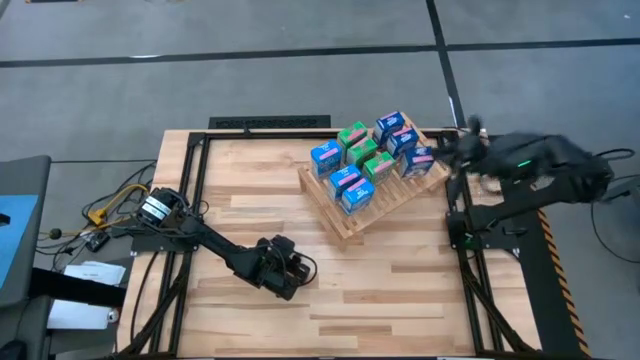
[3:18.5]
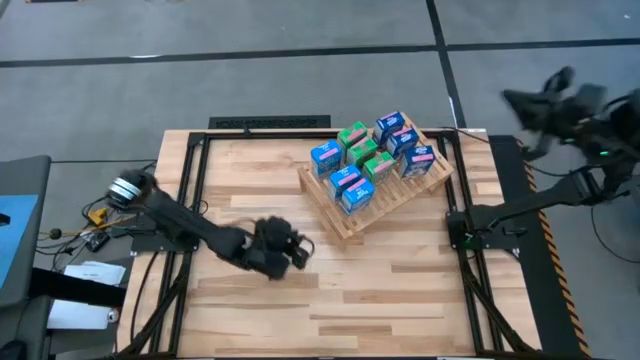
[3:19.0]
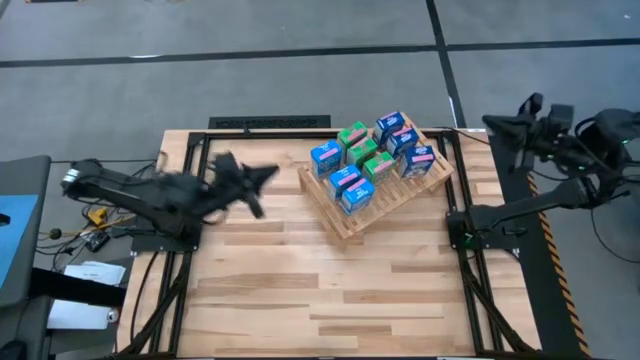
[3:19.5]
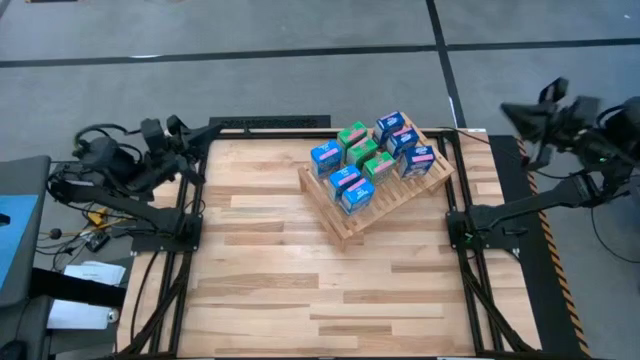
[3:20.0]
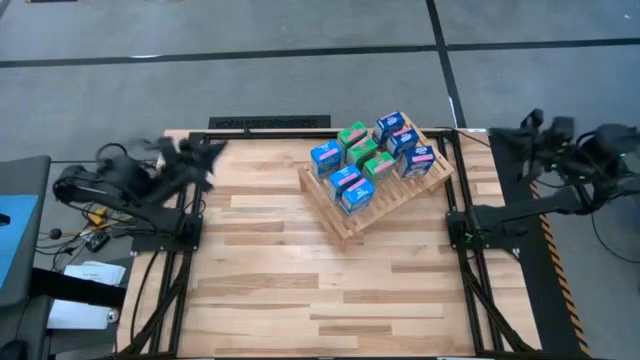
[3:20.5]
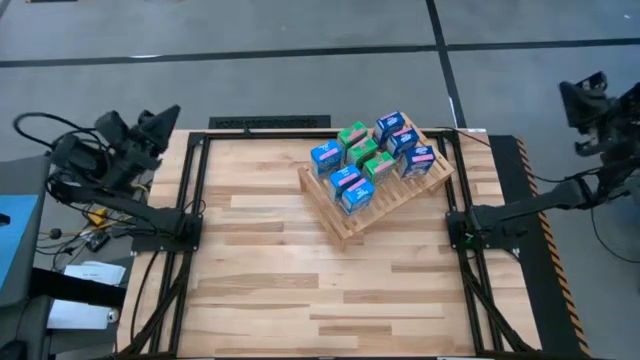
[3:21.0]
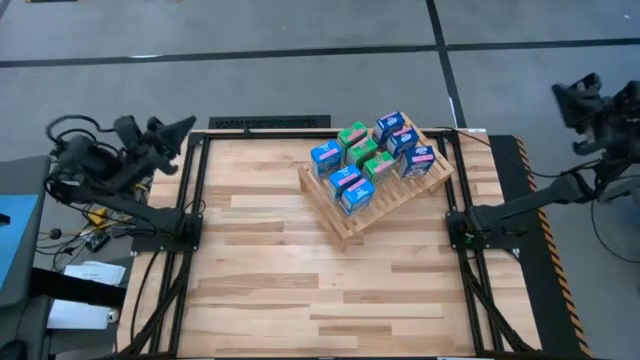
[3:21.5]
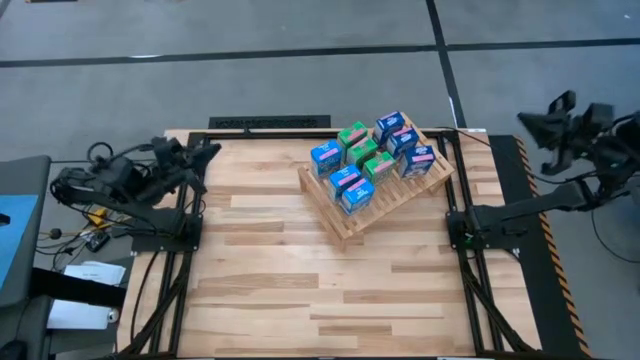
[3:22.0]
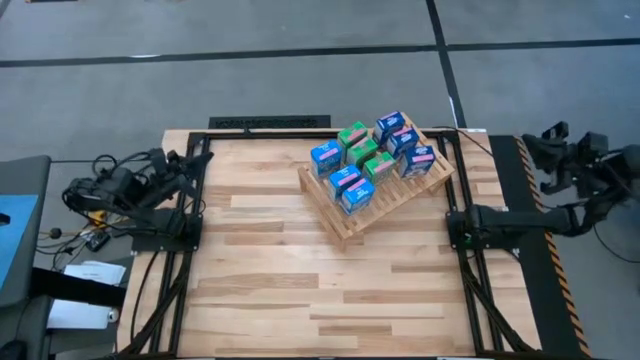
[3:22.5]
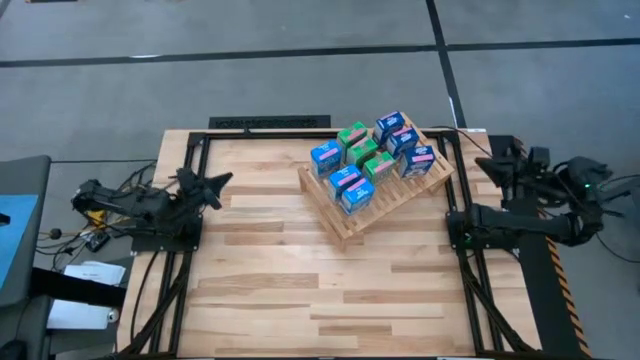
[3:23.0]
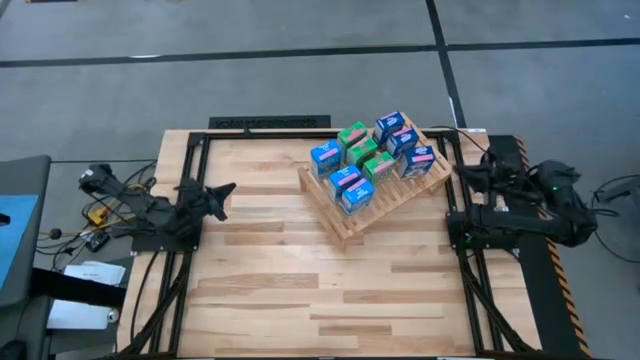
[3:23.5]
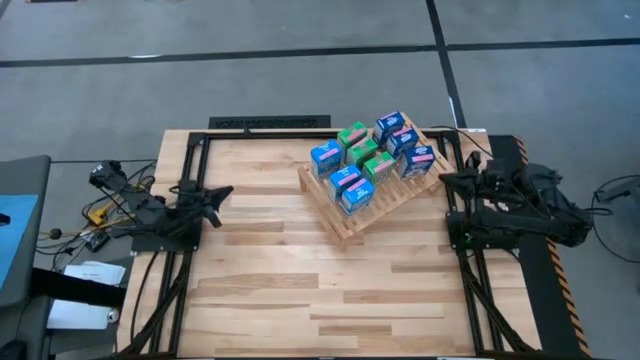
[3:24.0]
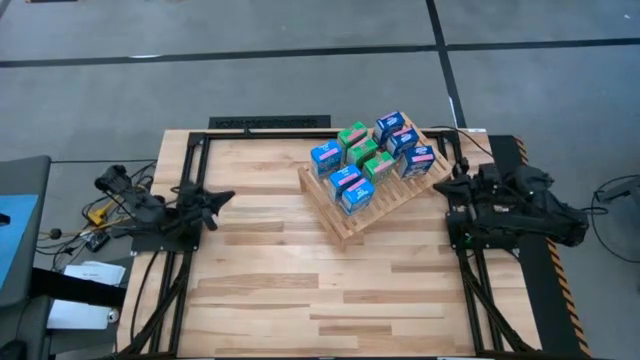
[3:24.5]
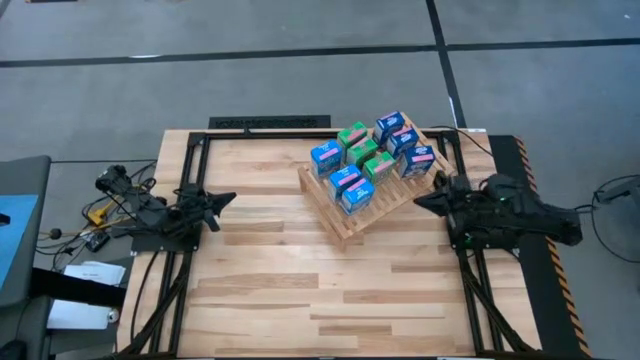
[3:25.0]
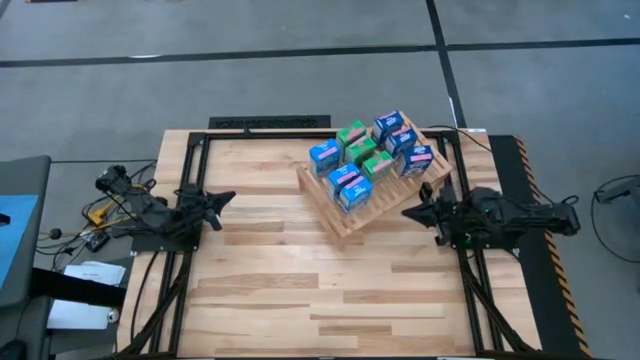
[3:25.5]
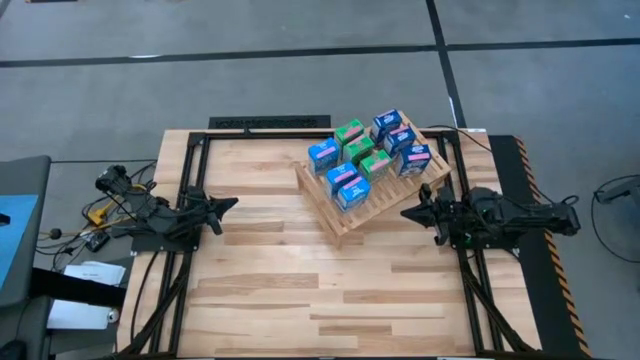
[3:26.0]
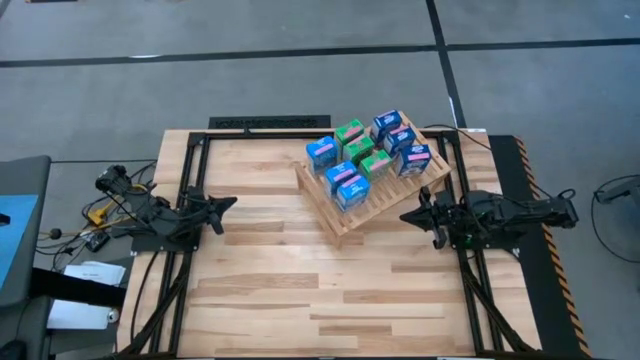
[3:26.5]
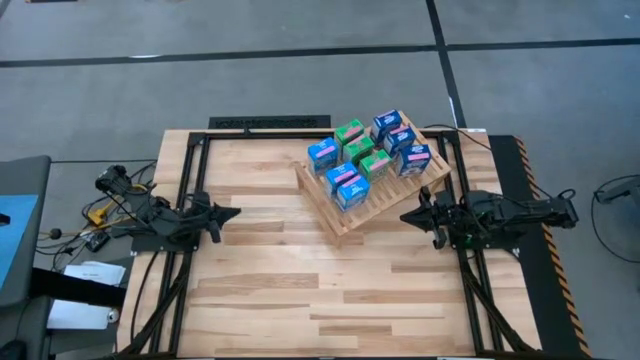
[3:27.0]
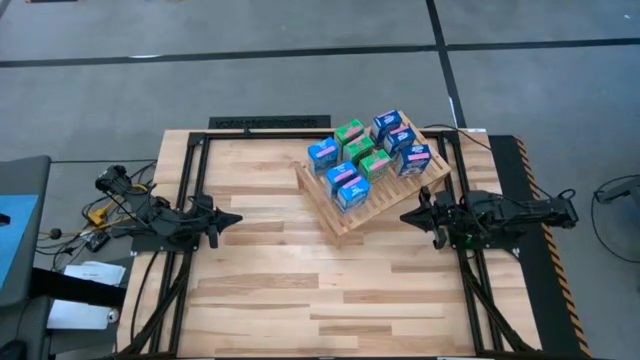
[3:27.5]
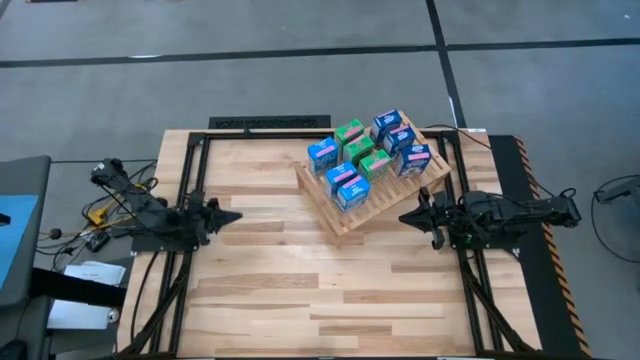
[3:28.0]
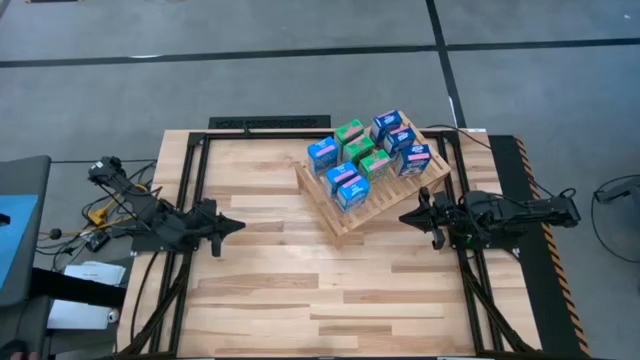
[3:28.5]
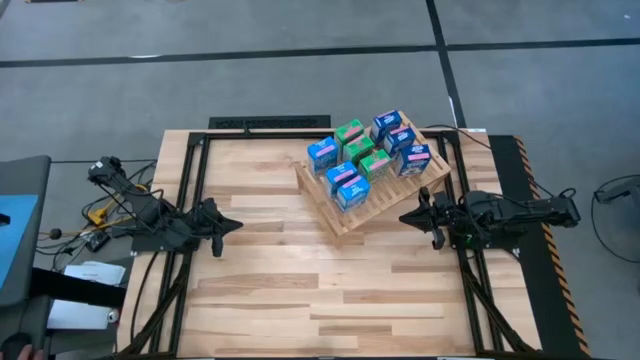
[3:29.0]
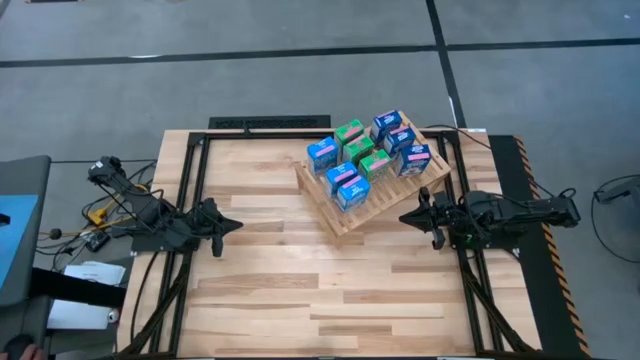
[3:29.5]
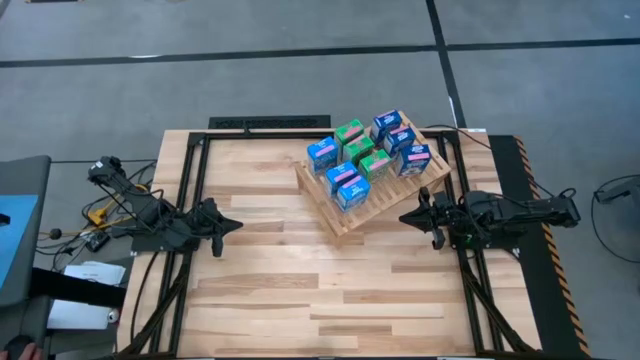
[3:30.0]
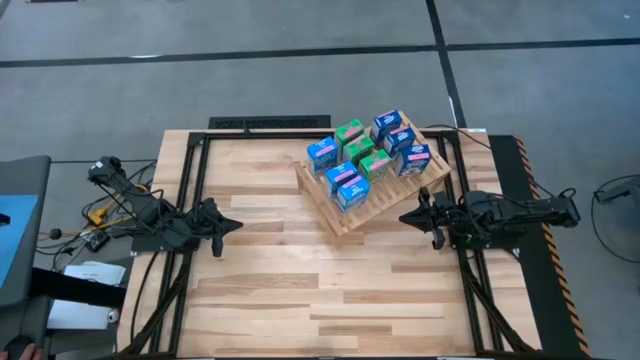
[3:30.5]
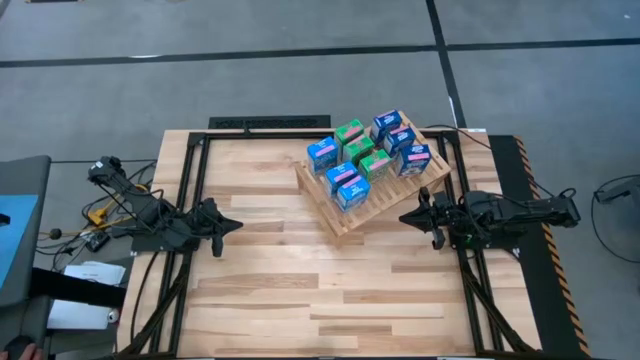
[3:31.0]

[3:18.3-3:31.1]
Task: Stack cereal on shelf
Return to Home Position

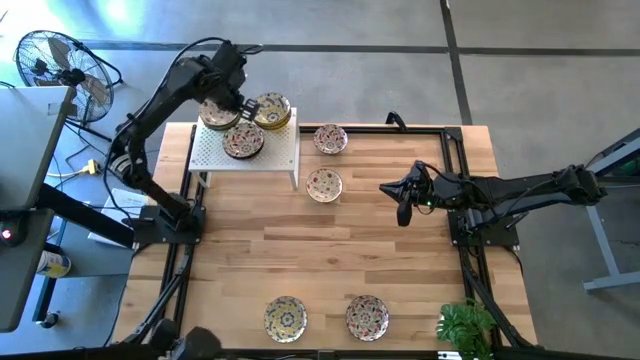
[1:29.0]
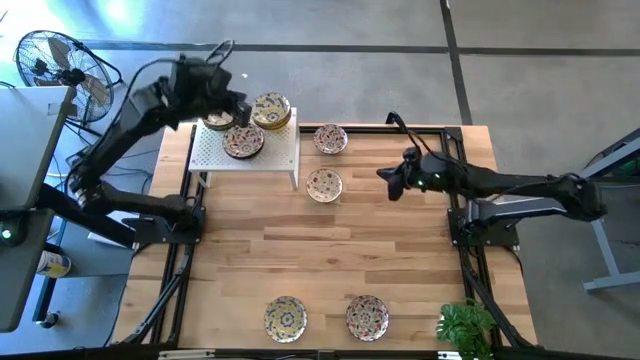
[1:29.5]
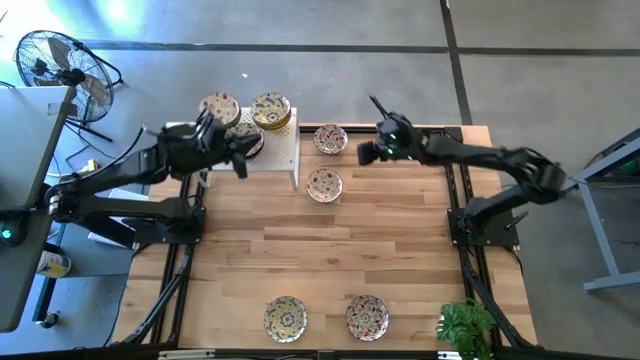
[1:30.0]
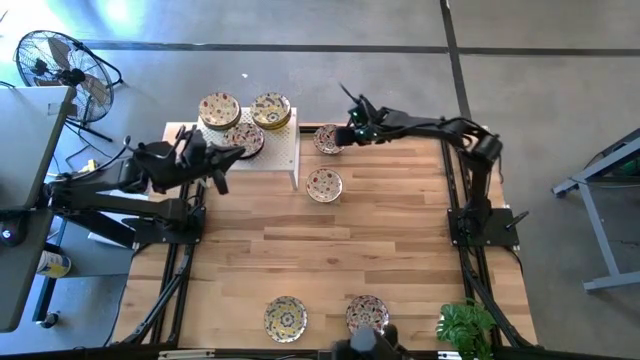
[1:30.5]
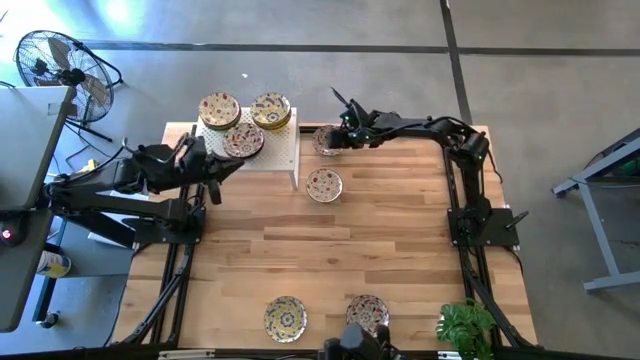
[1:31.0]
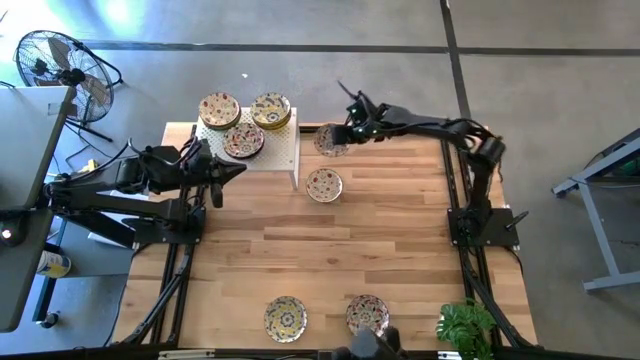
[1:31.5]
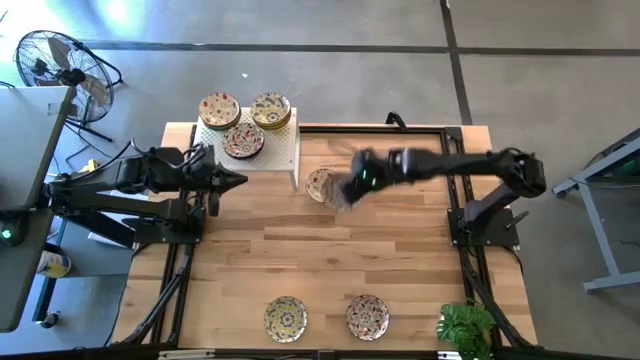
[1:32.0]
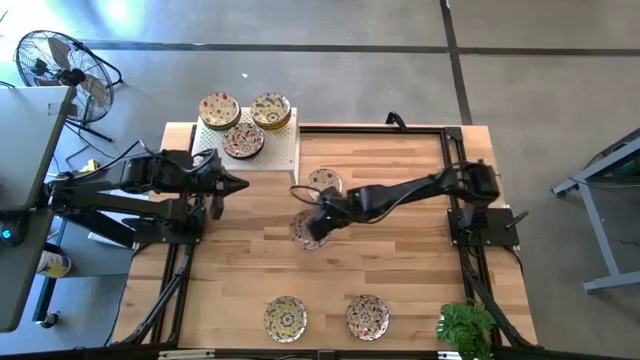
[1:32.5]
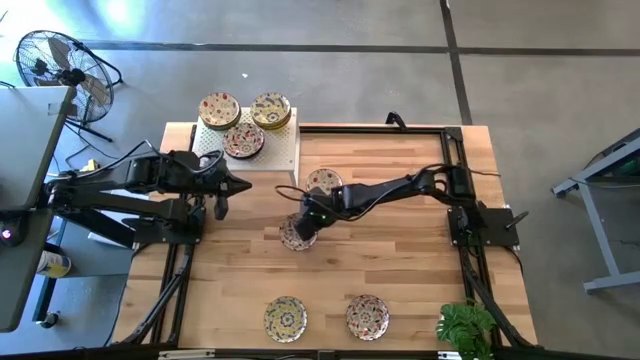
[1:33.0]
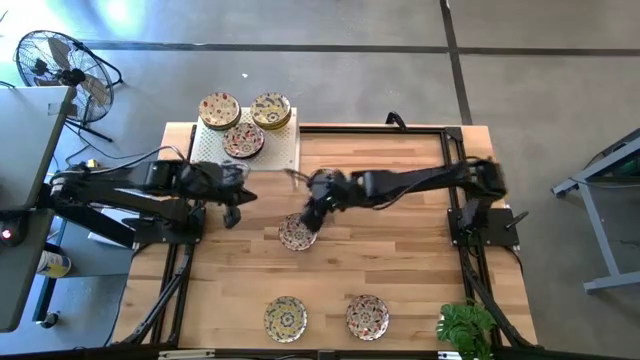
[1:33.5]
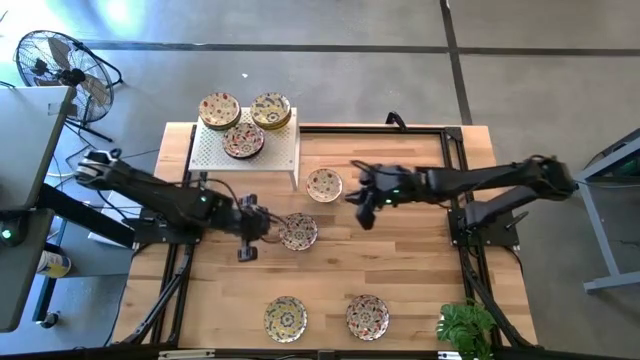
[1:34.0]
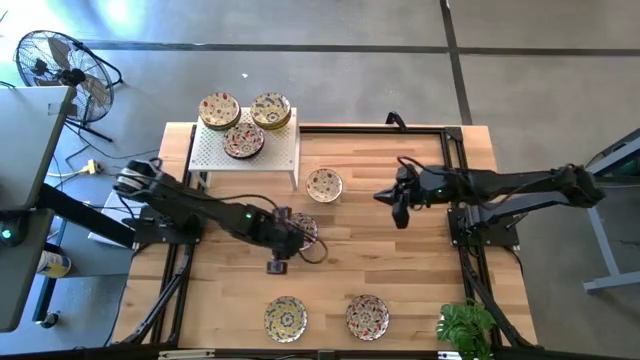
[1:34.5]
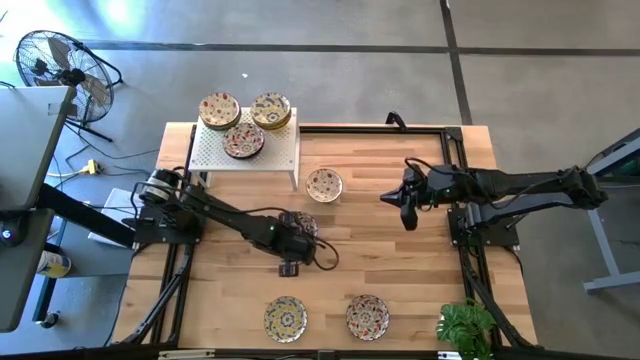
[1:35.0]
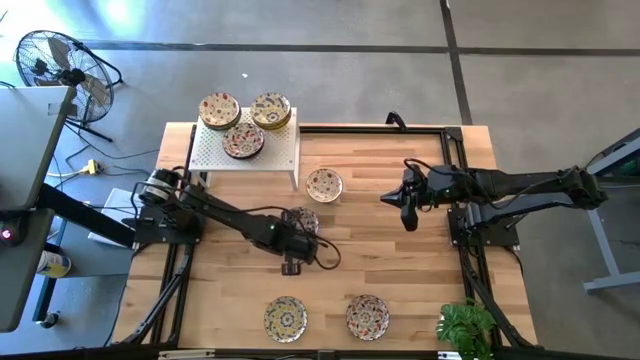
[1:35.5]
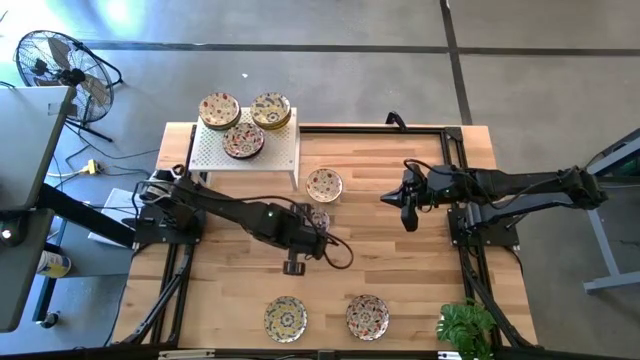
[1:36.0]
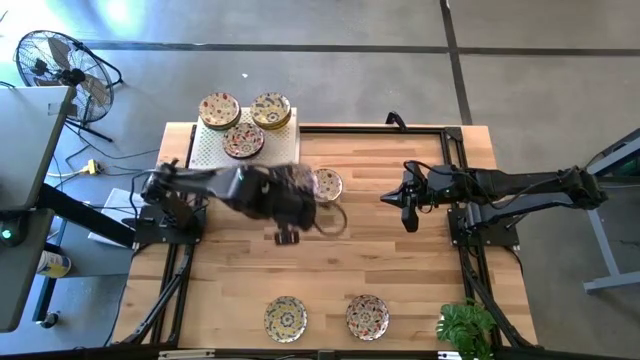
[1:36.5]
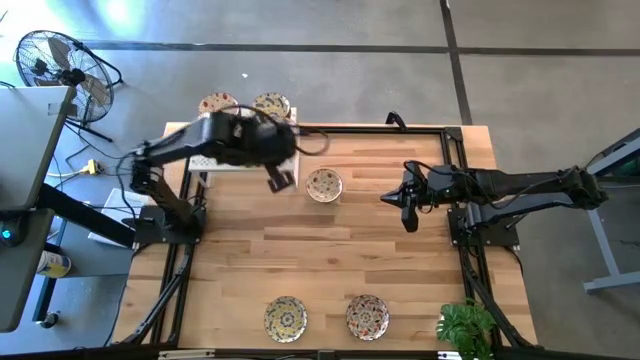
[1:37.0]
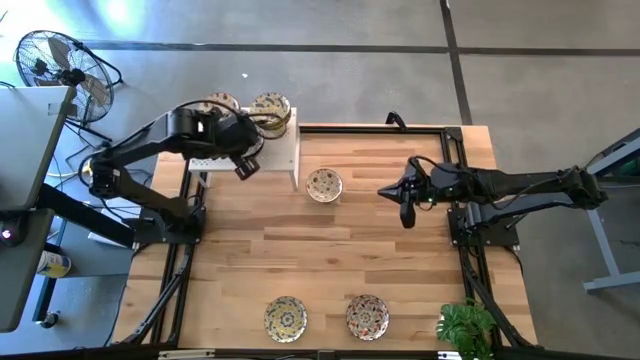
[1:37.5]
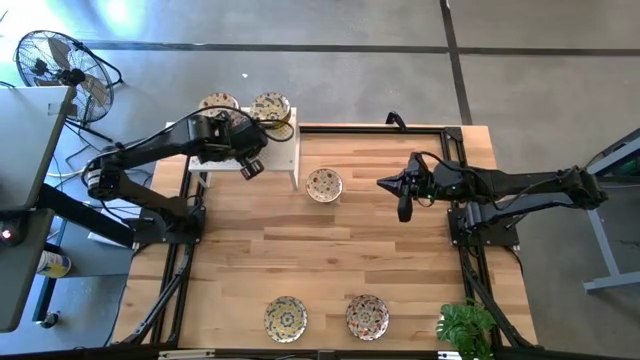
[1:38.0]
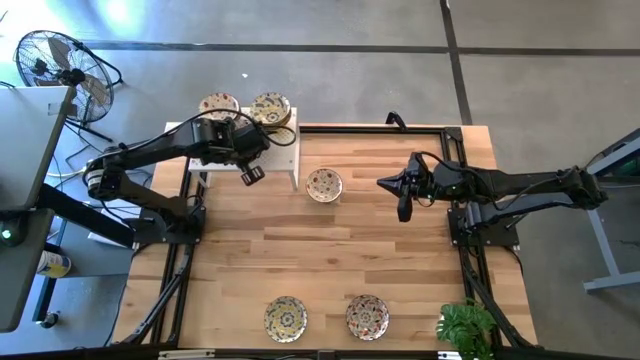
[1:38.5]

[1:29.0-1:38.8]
Task: Pick & Place Mini bowls
Stack the orange patterned bowl on the orange patterned bowl on the shelf
